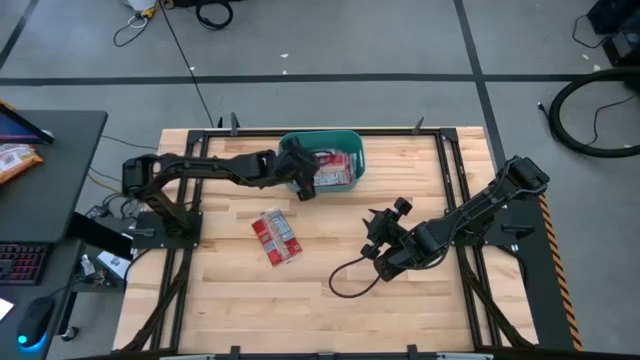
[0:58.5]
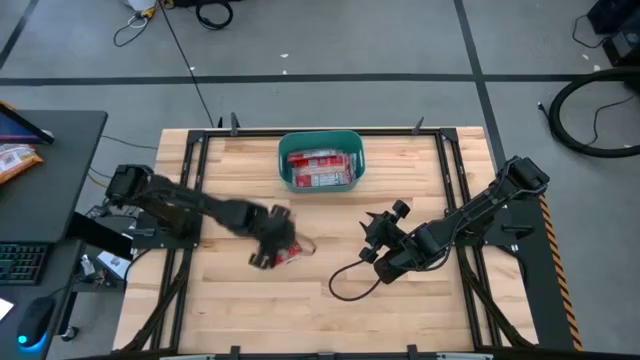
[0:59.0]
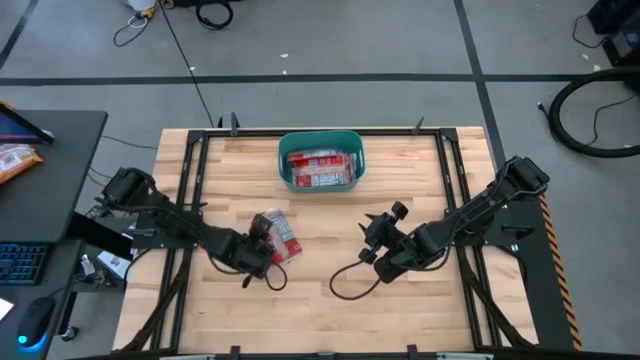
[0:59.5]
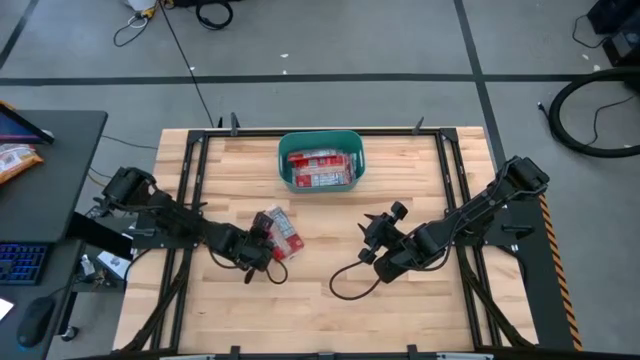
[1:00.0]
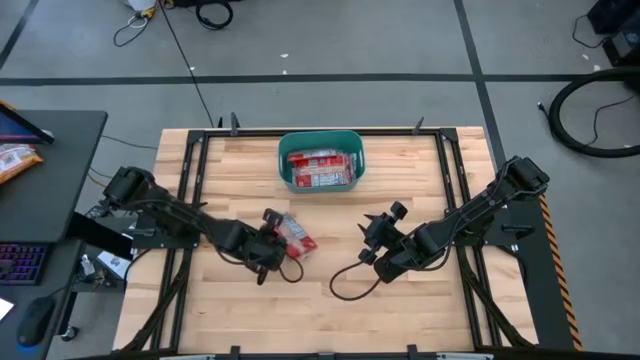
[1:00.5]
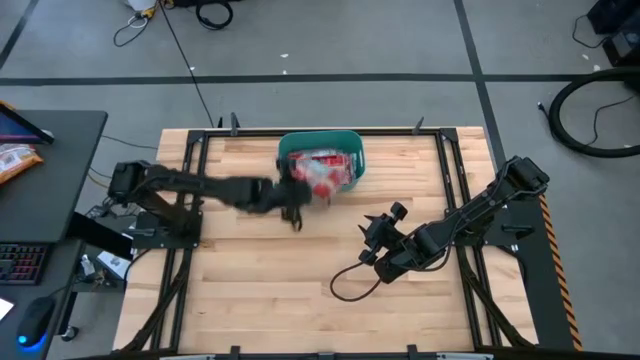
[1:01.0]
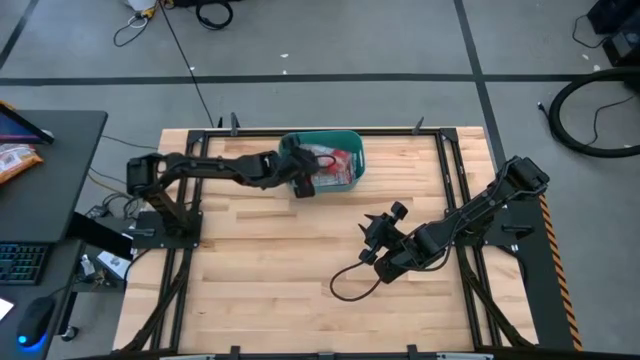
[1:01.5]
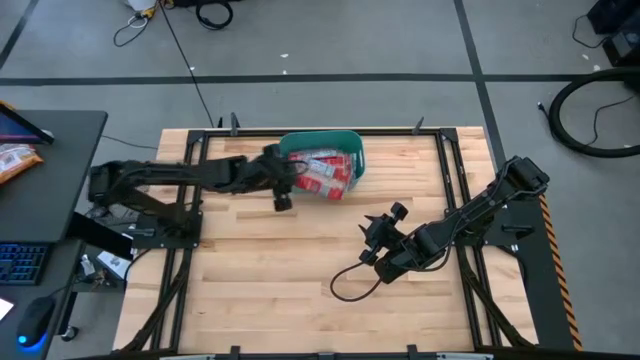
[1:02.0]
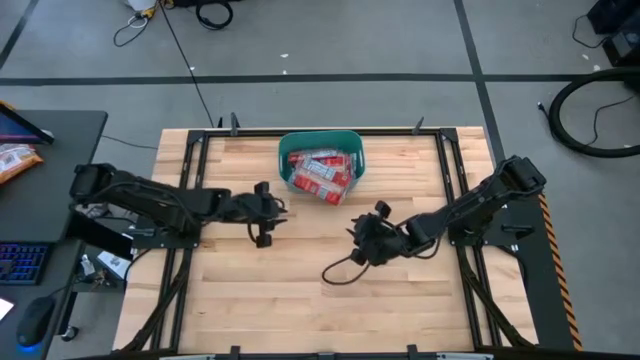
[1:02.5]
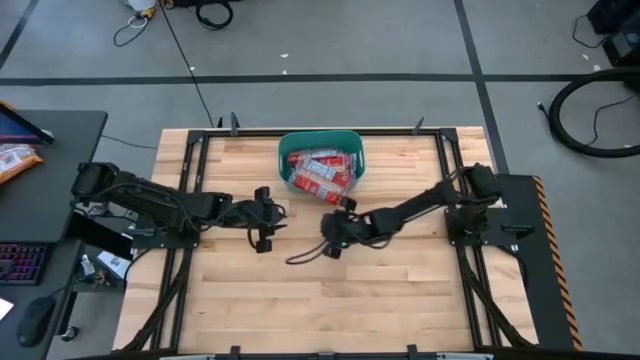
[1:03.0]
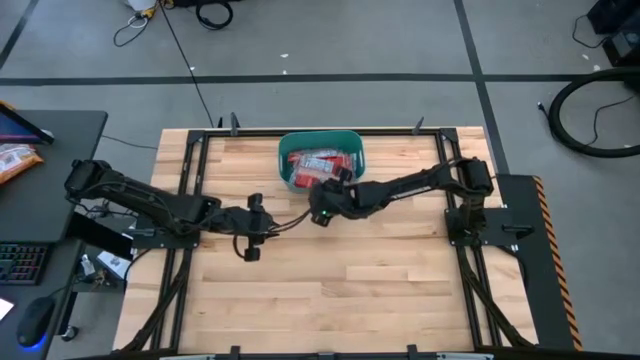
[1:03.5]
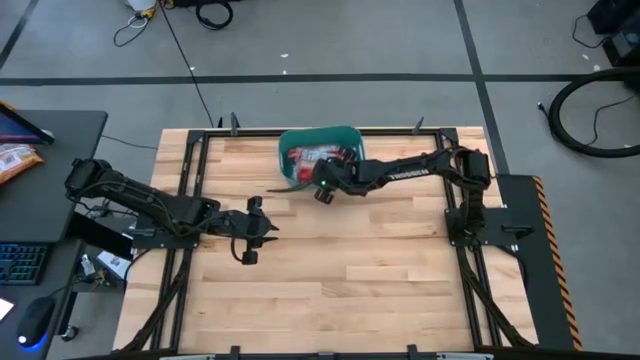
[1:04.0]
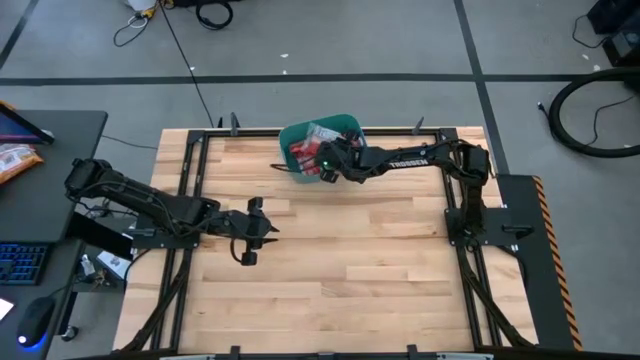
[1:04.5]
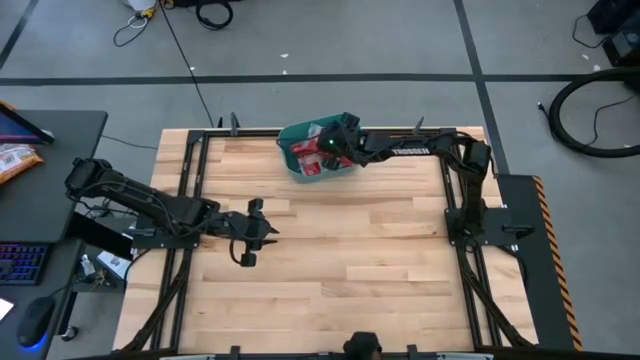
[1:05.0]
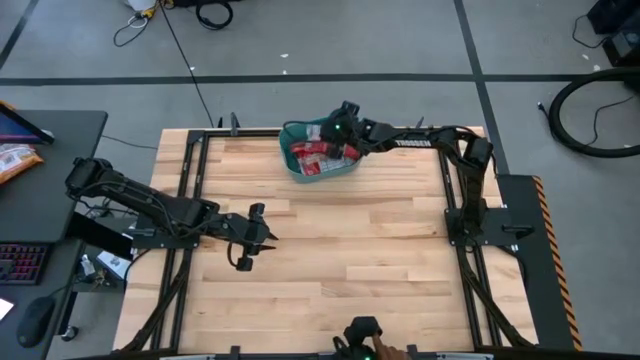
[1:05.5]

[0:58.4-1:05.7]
Task: Sort popcorn bags into baskets
Put the red popcorn bag into the blue bin

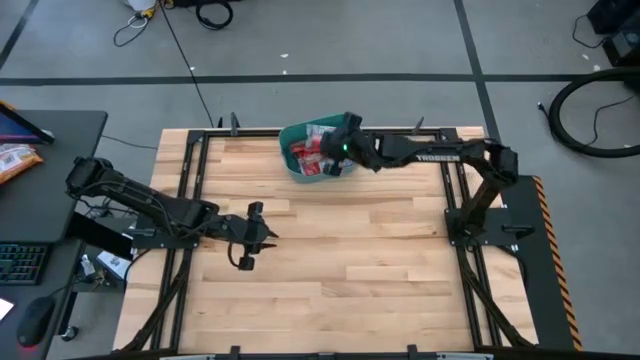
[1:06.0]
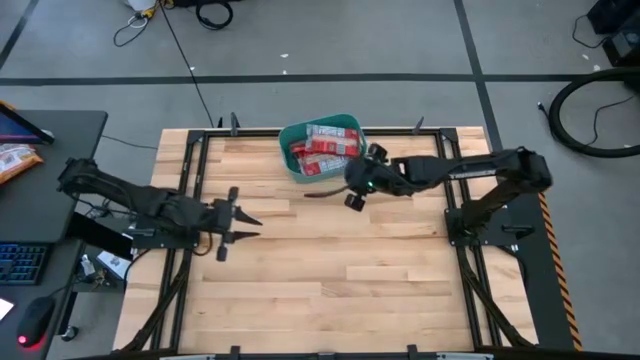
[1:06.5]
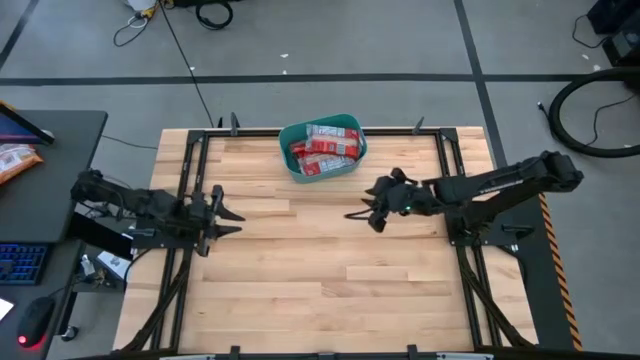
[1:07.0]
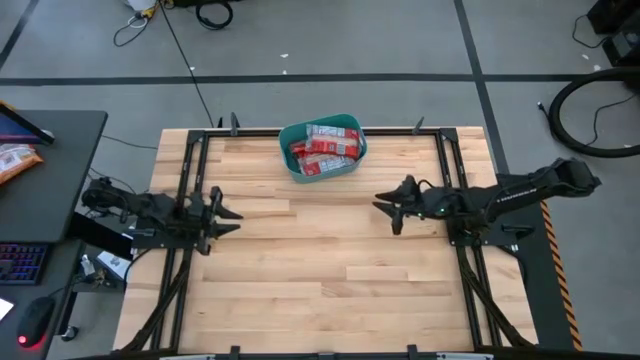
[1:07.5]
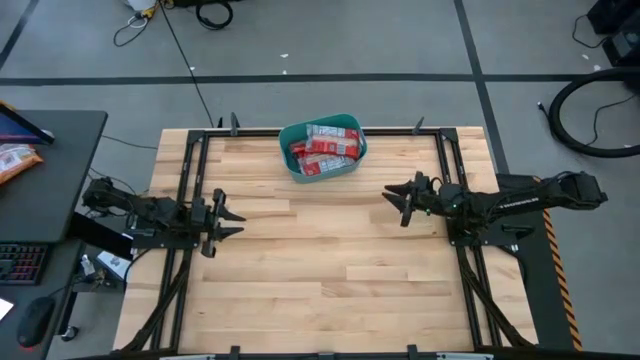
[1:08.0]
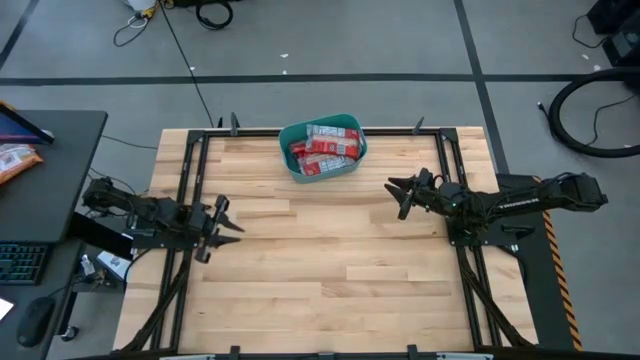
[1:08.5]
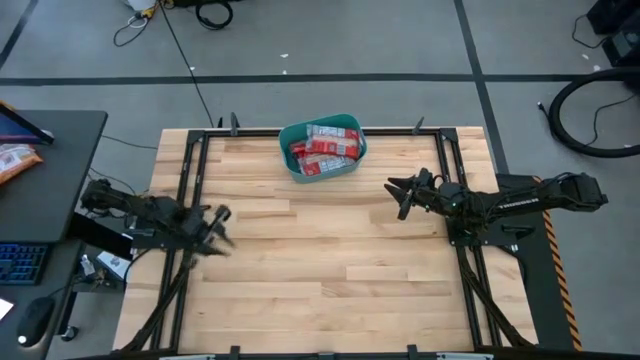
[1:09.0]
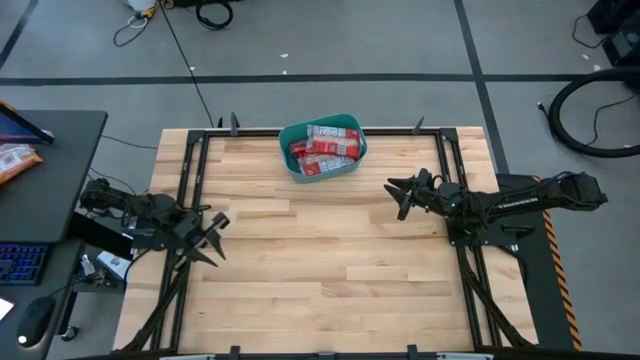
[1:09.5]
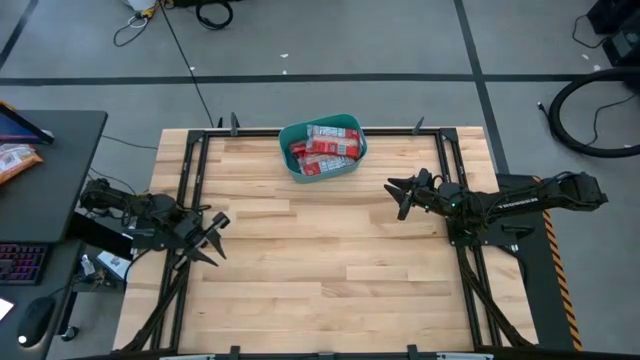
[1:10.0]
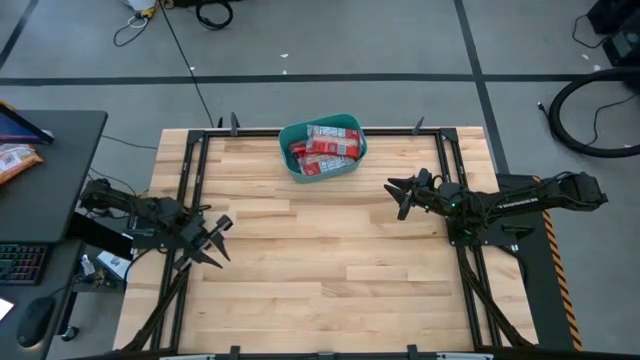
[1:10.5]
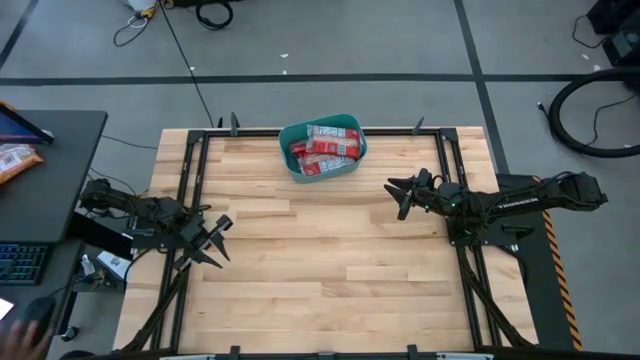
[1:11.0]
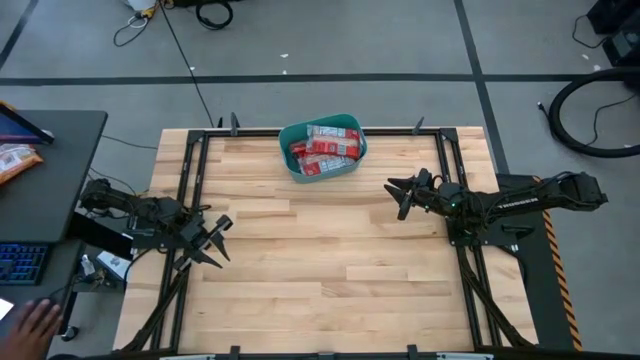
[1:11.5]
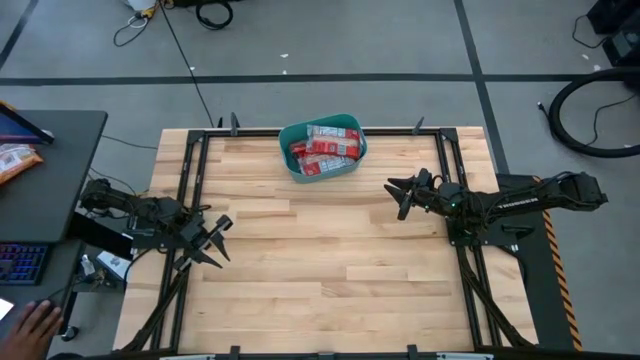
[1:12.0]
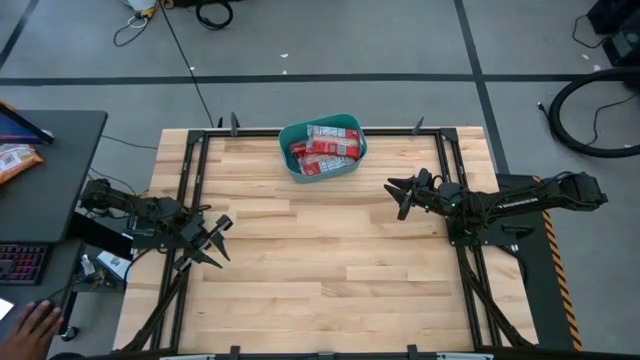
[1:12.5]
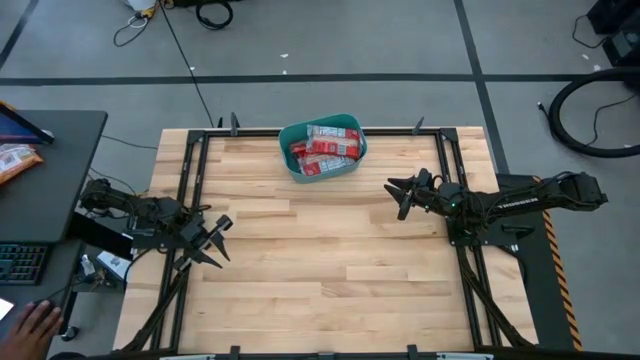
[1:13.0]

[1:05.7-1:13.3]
Return to Home Position

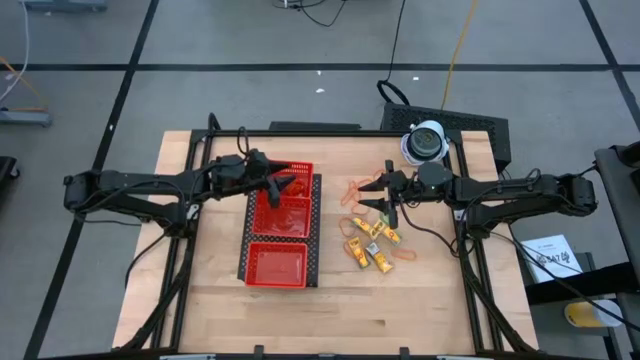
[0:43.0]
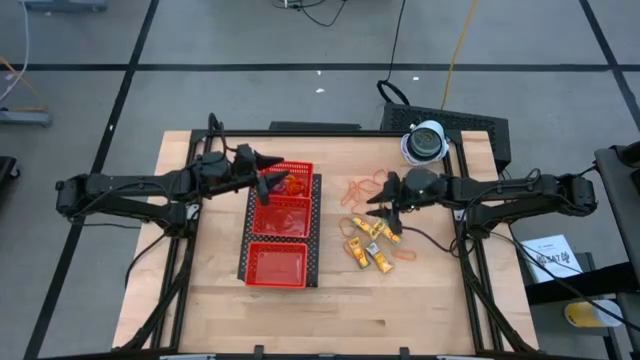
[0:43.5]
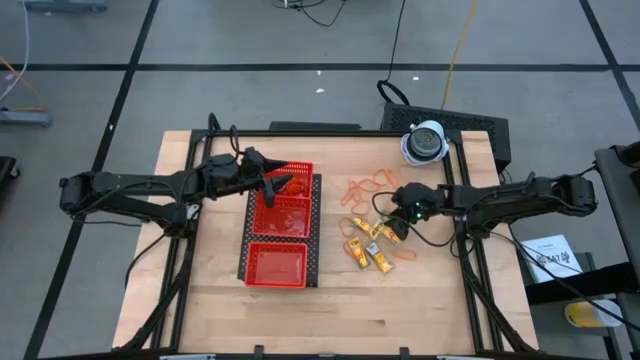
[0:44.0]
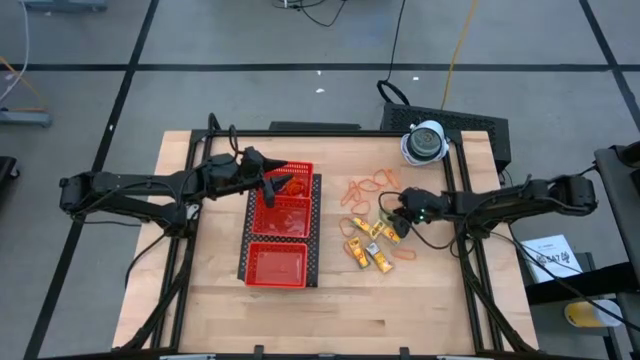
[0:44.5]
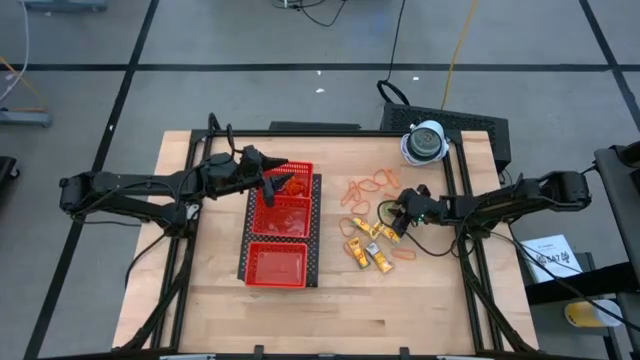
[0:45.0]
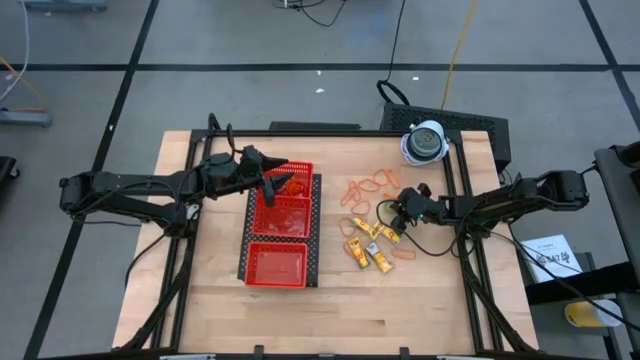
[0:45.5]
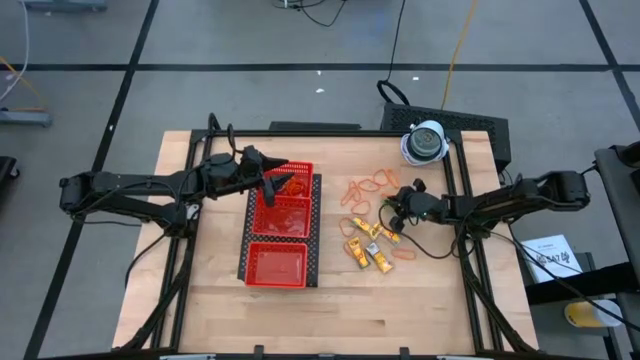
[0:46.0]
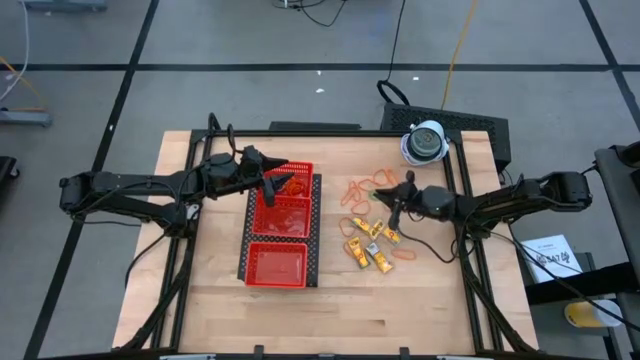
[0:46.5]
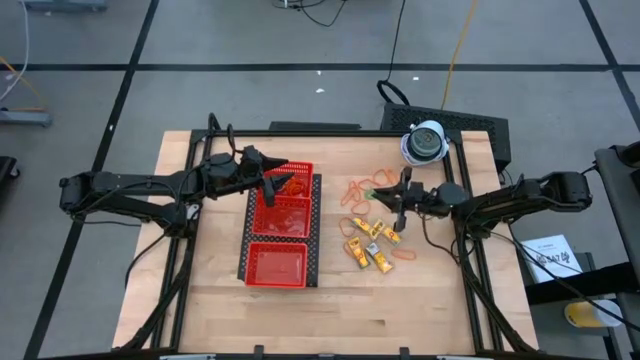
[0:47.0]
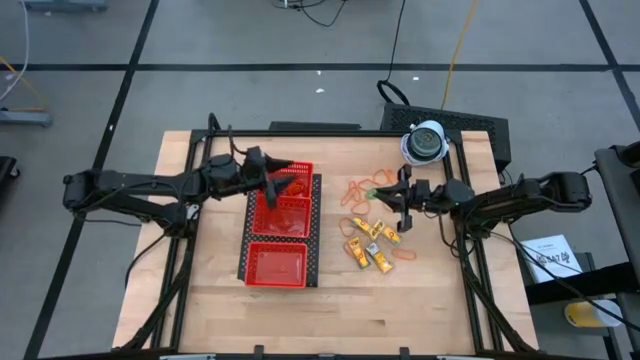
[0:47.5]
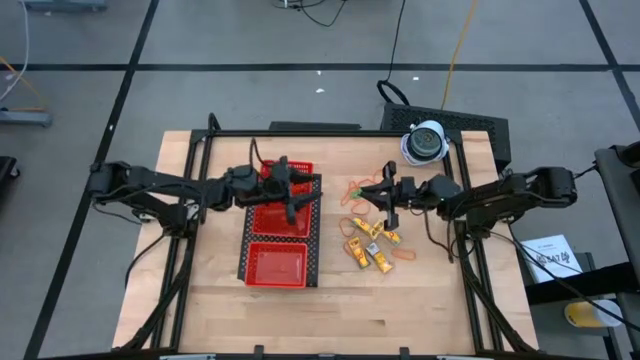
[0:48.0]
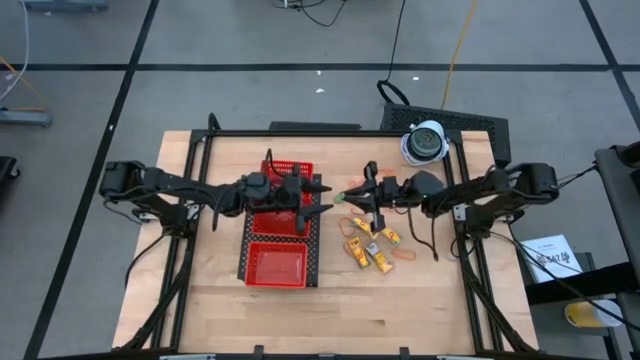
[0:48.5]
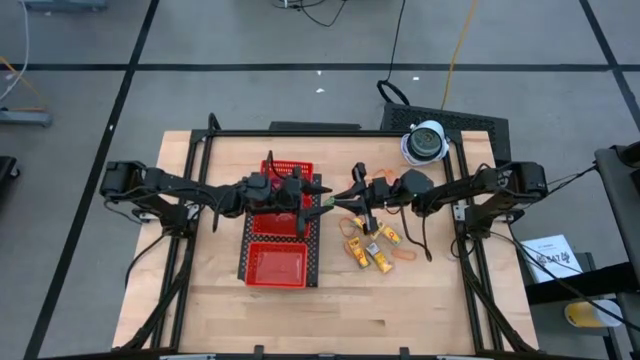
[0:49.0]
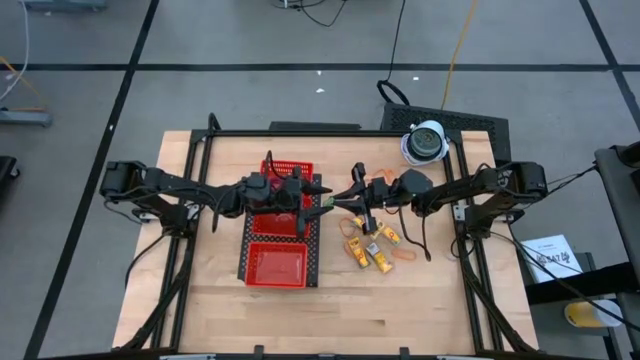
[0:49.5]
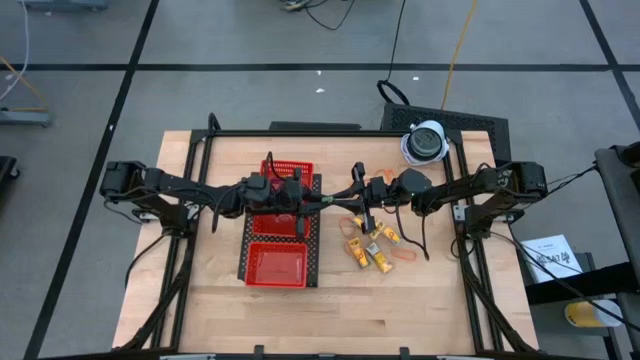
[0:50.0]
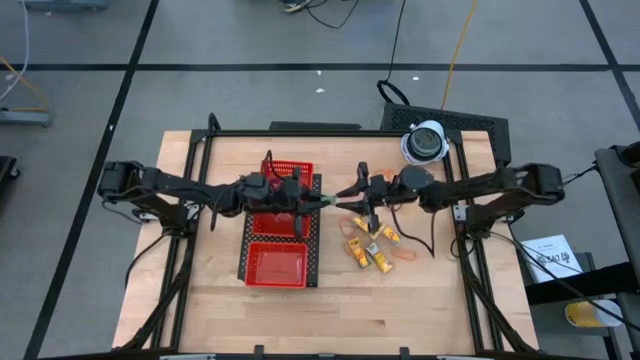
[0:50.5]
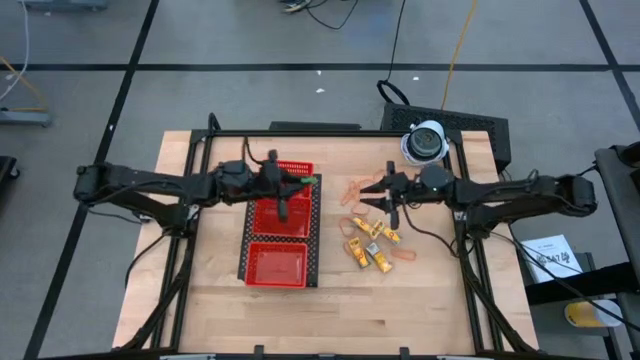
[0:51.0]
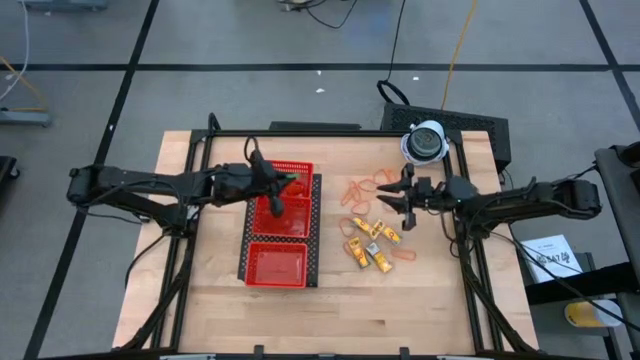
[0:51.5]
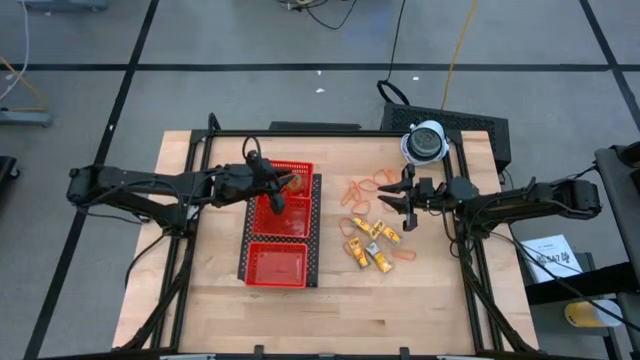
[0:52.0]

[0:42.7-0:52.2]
Task: Pick & Place Office Desk Supplies
Put the green spring keychain into the top red basket on the shelf
